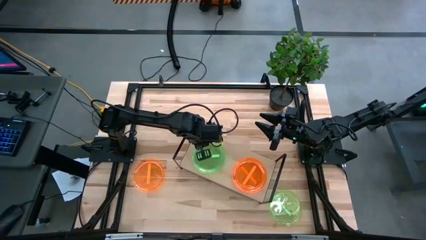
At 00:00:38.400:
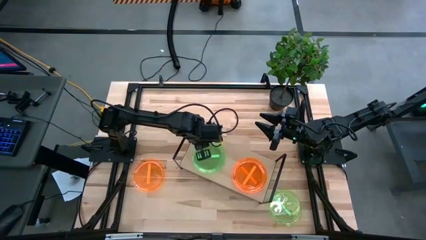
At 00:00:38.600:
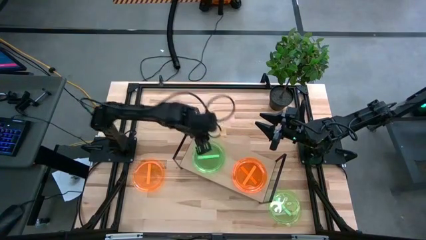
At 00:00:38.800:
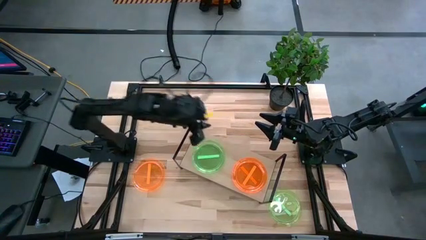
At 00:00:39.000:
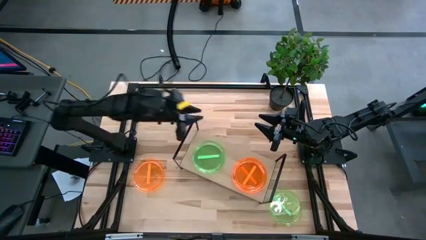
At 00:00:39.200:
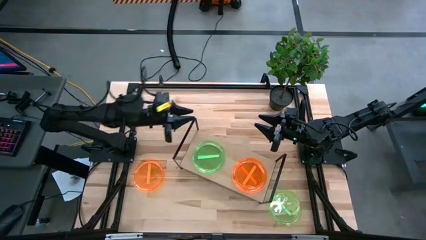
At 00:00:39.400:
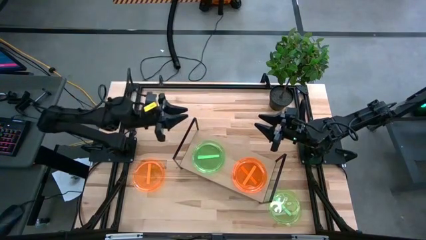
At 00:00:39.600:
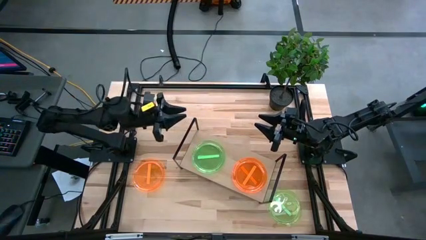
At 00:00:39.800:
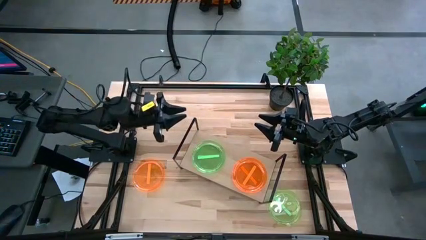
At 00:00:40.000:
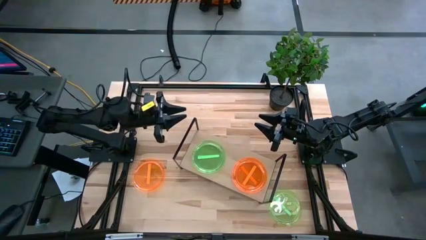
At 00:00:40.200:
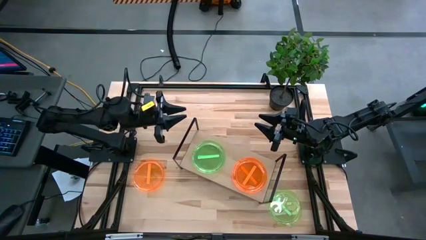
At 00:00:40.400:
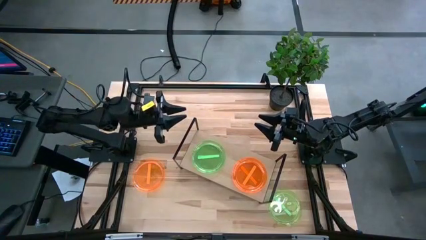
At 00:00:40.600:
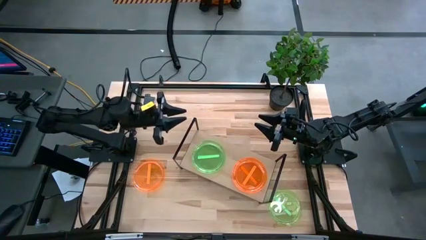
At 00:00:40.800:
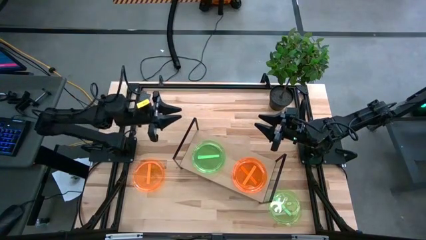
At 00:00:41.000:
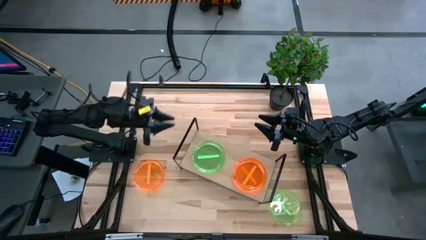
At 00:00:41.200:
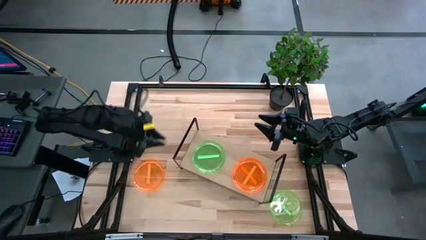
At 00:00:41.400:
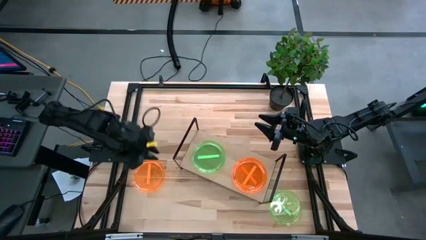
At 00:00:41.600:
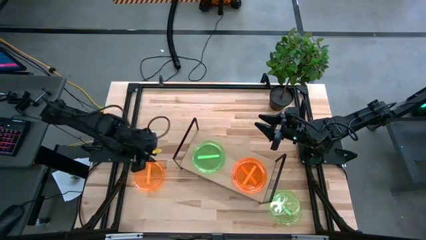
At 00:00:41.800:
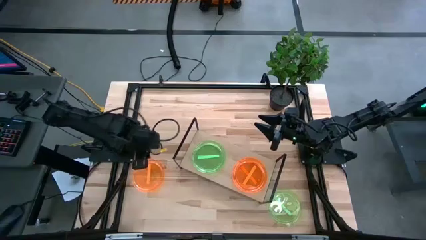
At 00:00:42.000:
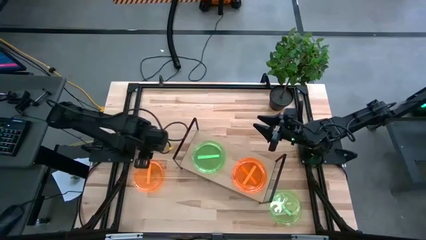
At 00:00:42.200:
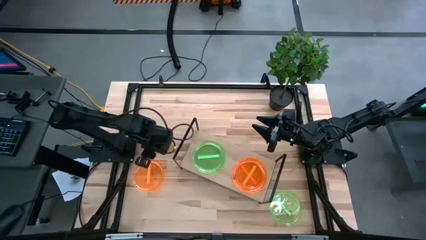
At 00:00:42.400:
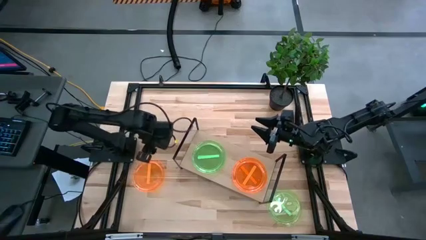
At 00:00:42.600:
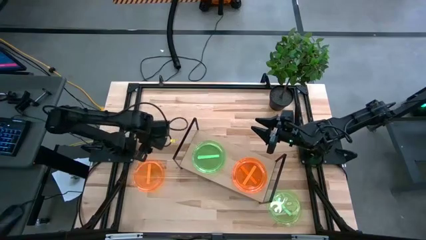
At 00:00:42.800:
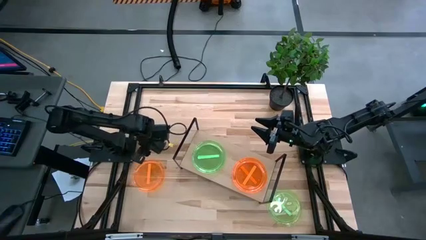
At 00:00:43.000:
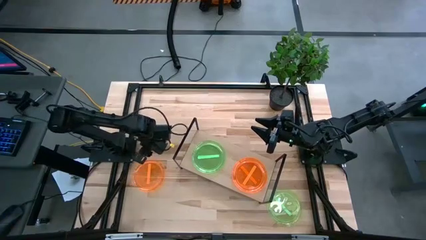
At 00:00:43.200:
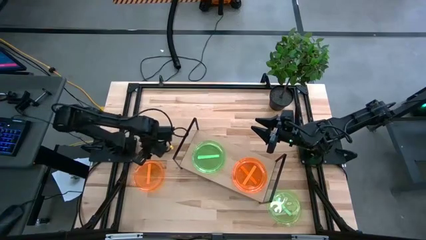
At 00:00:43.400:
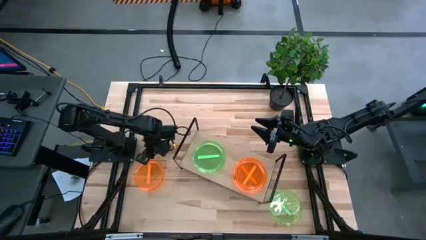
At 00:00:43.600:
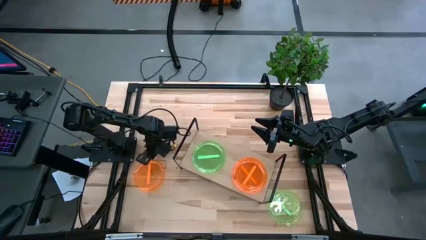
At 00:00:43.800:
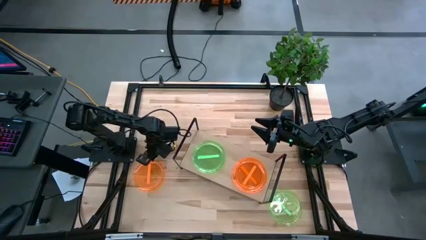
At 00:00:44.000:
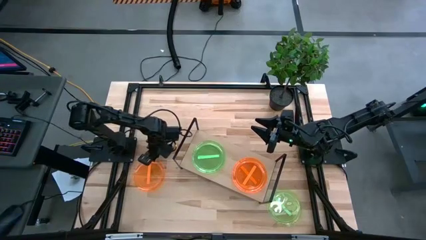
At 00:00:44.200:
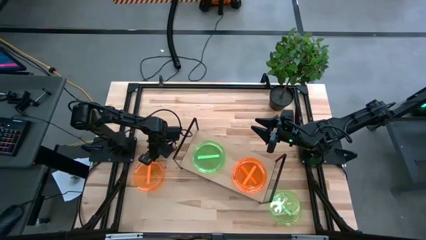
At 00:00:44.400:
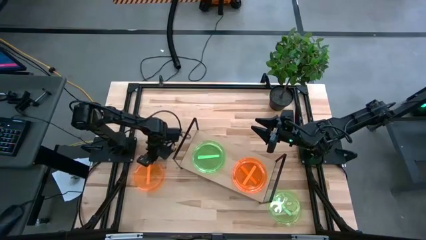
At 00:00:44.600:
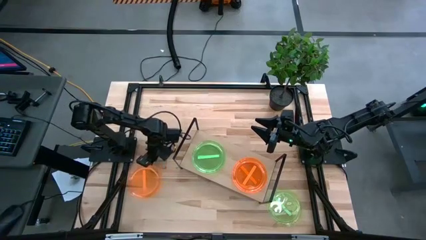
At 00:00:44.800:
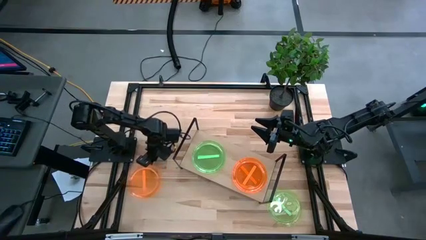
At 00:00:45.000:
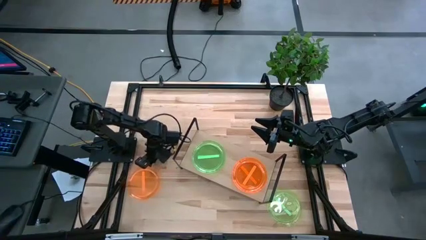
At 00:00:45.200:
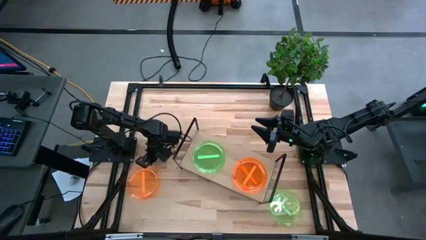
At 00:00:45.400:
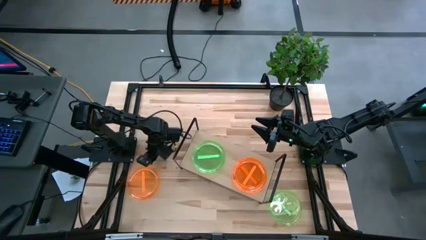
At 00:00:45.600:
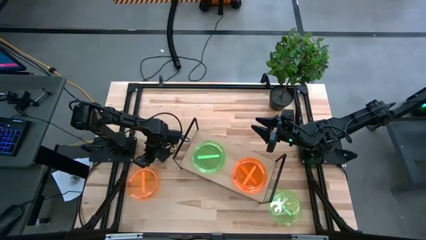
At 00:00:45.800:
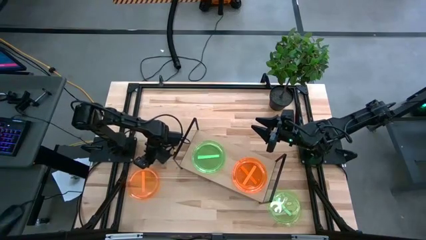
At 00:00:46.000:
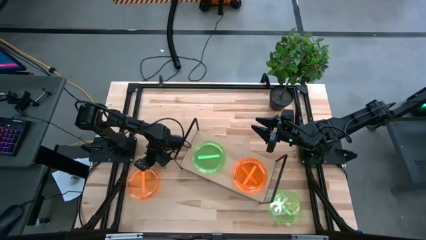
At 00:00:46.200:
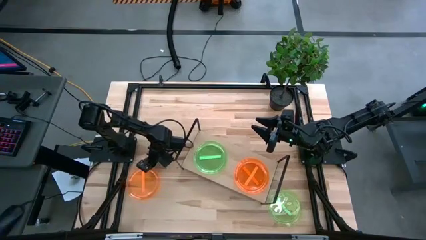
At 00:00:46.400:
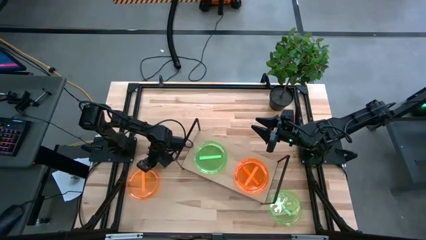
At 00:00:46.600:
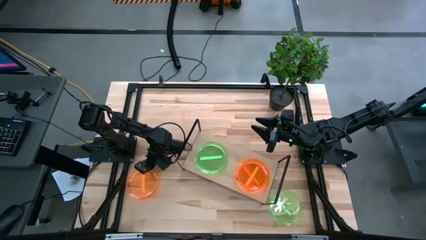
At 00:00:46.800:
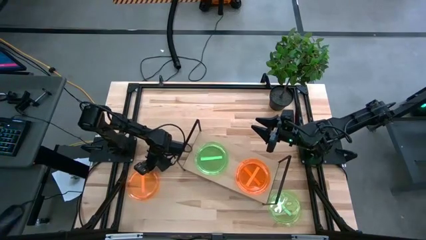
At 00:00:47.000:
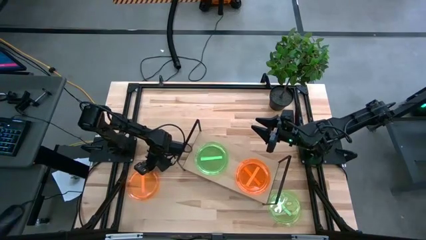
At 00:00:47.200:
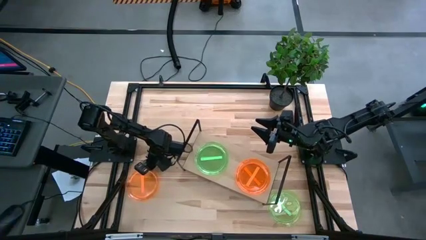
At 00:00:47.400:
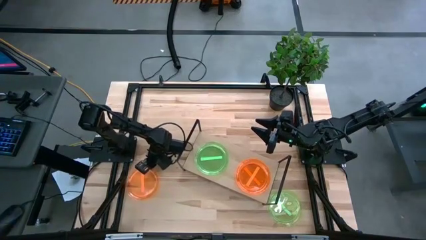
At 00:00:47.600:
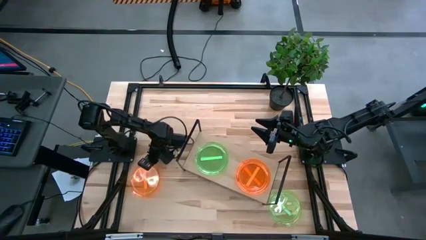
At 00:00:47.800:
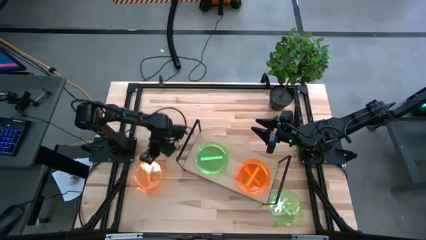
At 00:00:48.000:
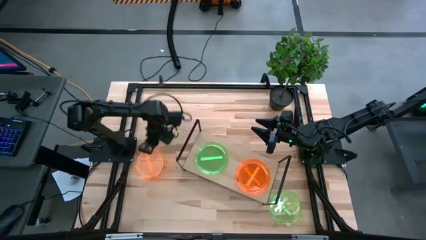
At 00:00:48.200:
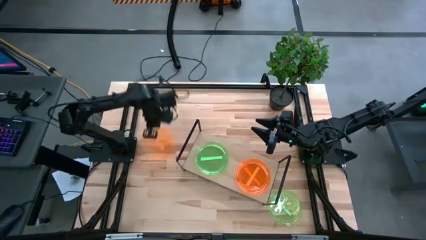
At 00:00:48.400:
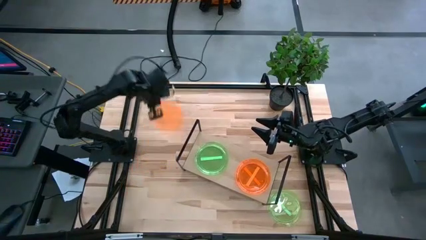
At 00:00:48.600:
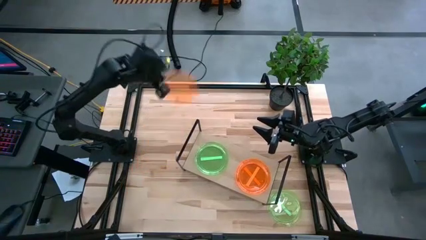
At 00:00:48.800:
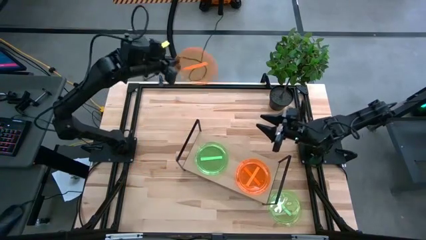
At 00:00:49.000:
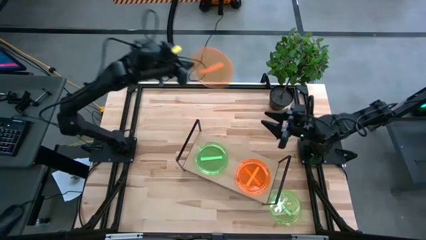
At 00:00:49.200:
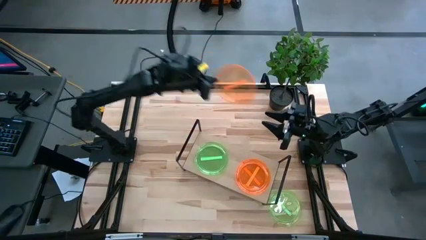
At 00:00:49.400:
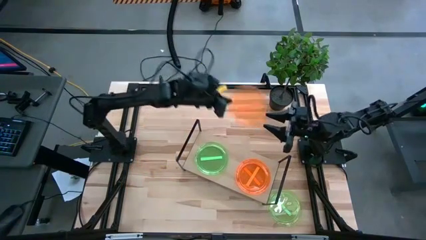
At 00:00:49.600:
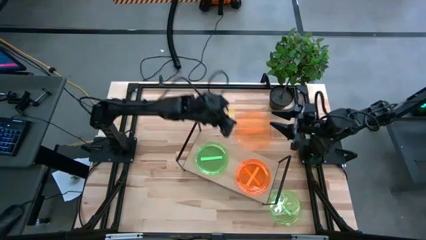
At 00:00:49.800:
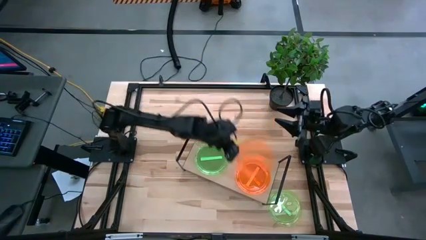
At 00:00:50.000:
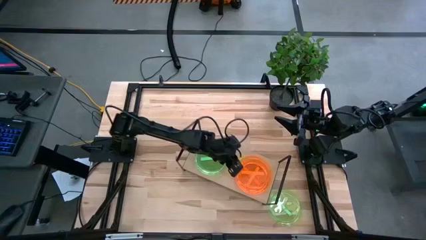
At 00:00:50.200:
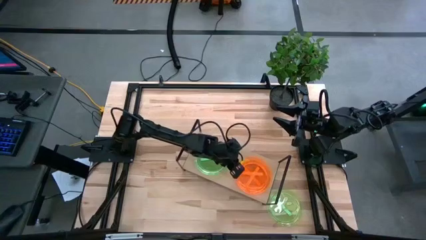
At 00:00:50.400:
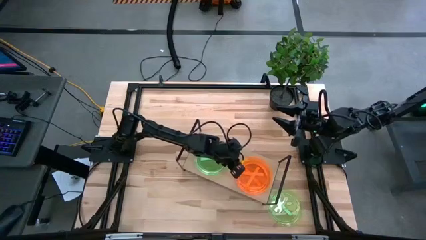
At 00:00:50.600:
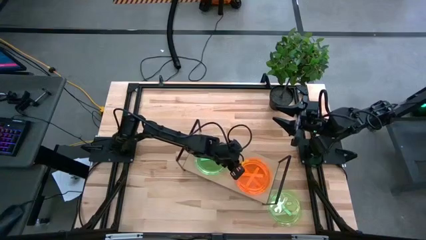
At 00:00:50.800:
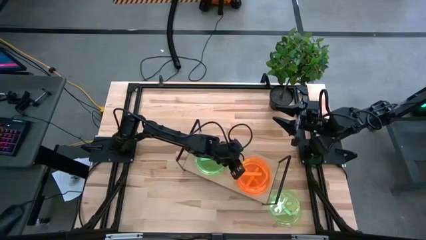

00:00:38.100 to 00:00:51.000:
Task: Place and stack plates onto a shelf
Stack the orange plate on the top of the orange plate on the shelf

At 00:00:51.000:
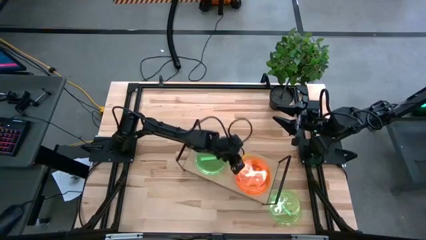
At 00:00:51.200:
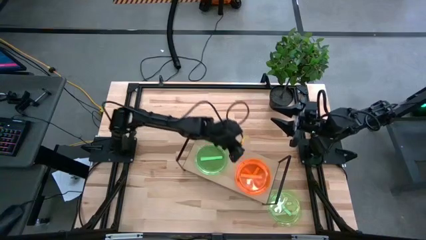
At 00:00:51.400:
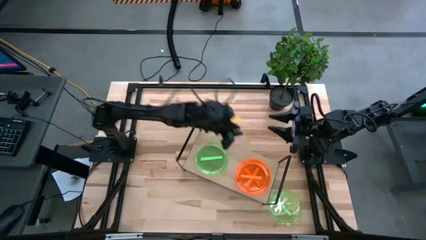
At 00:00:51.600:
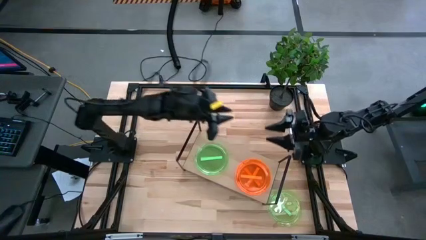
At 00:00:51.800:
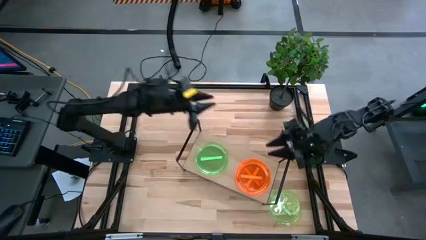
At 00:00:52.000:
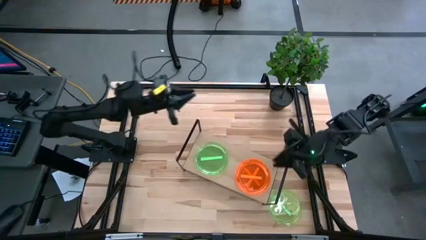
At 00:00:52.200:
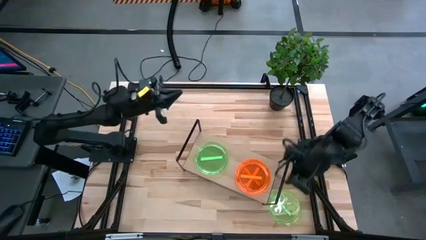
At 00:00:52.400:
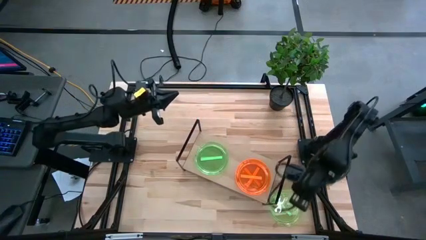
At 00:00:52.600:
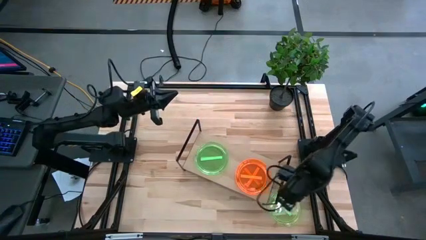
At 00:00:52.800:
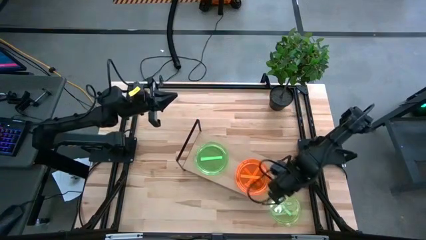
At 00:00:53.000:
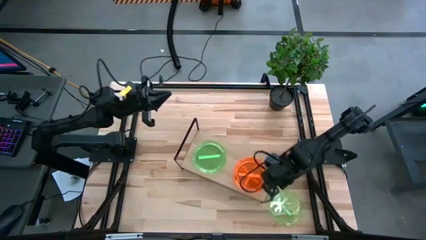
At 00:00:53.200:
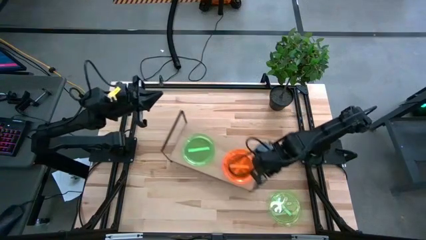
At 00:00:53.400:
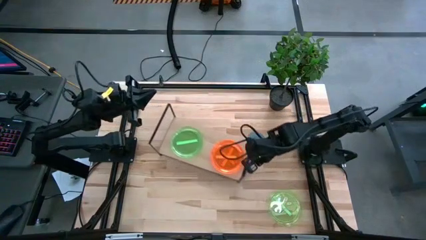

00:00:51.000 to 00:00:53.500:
Adjust the shelf

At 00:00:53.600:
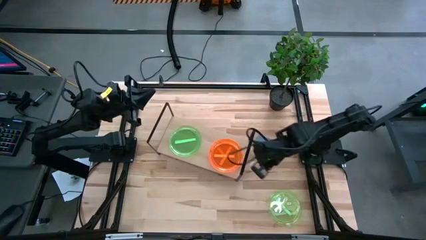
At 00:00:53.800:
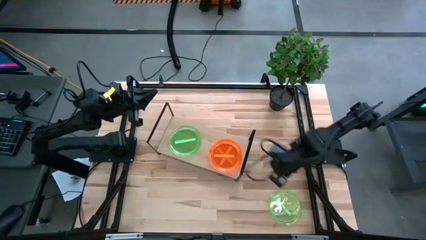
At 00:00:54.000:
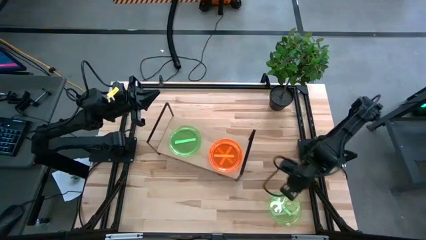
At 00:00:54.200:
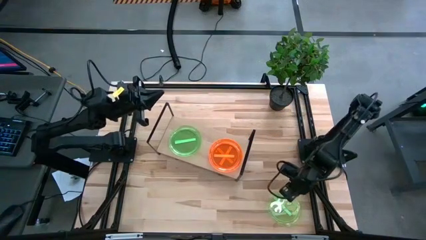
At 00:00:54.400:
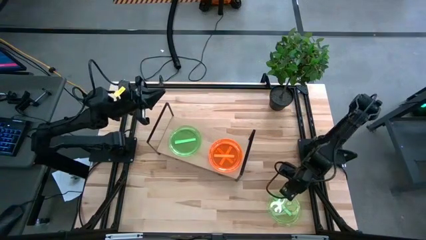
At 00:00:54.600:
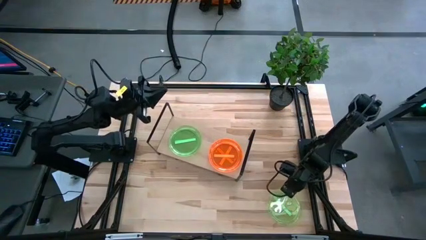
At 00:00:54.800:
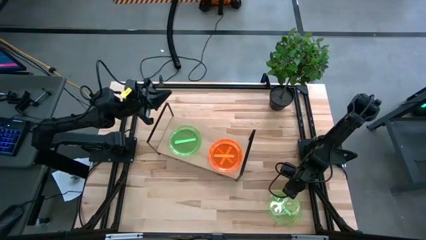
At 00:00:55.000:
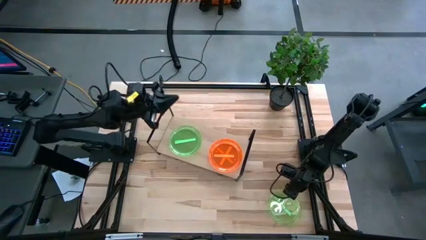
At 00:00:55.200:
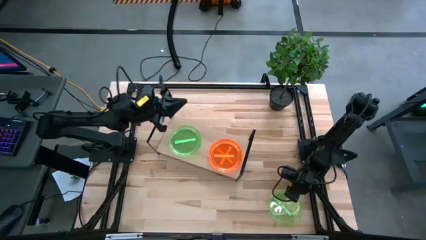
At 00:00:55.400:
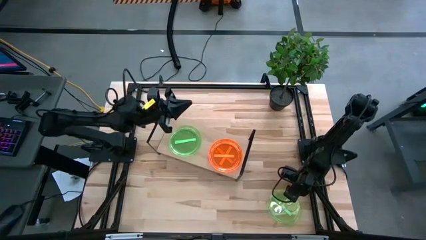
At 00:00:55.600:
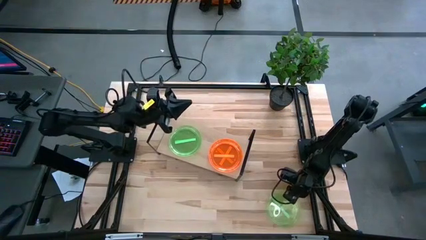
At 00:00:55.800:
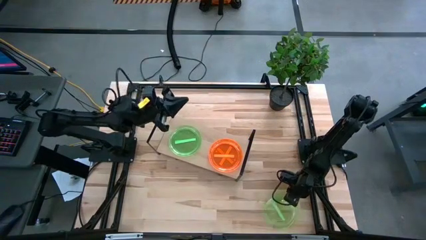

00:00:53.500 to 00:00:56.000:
Stack the green plate on the top of the green plate on the shelf
